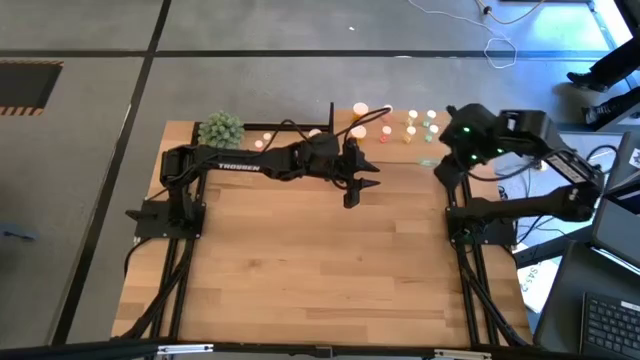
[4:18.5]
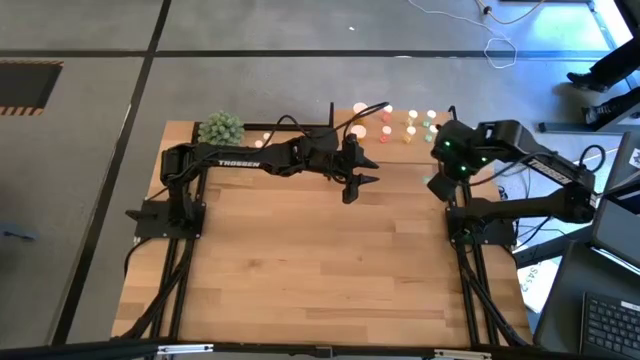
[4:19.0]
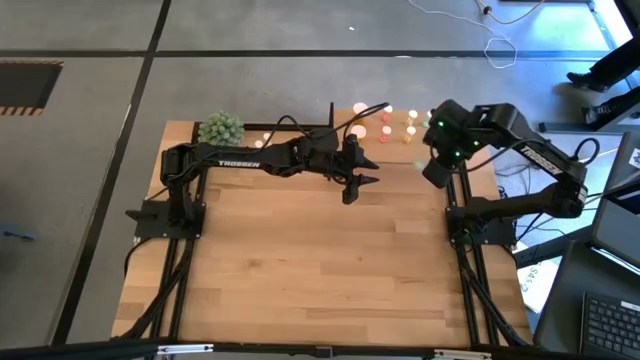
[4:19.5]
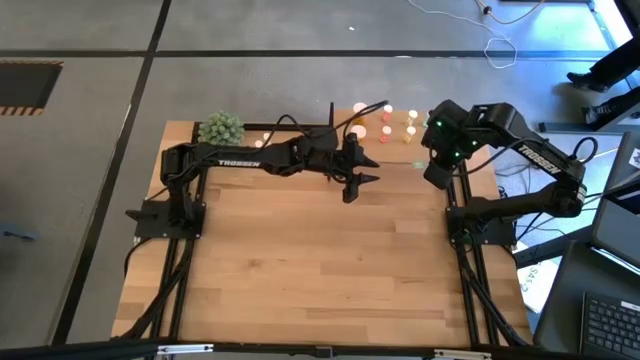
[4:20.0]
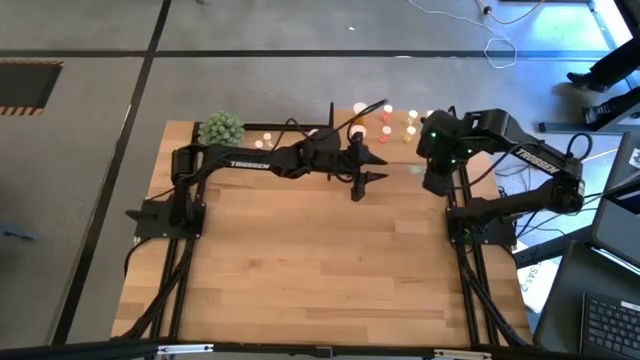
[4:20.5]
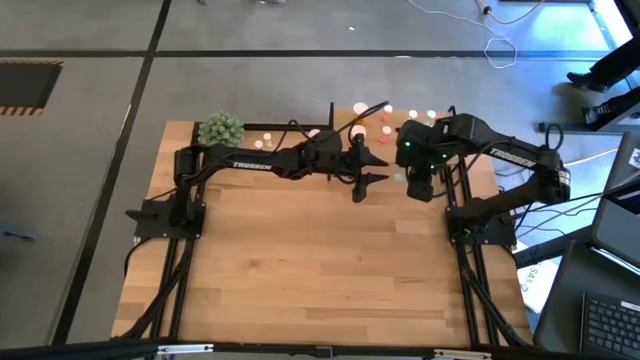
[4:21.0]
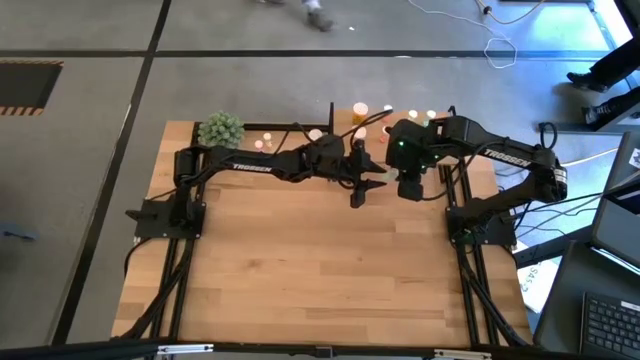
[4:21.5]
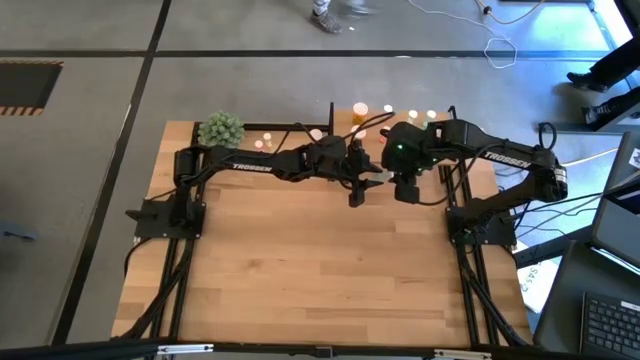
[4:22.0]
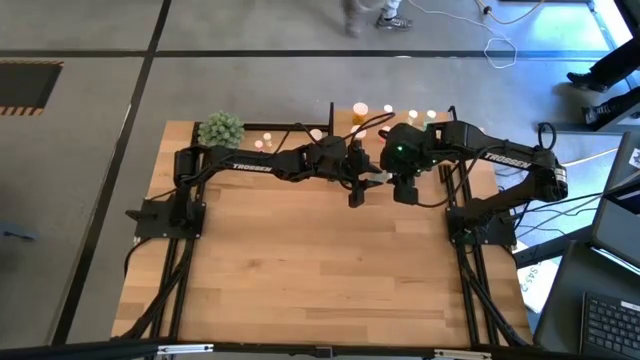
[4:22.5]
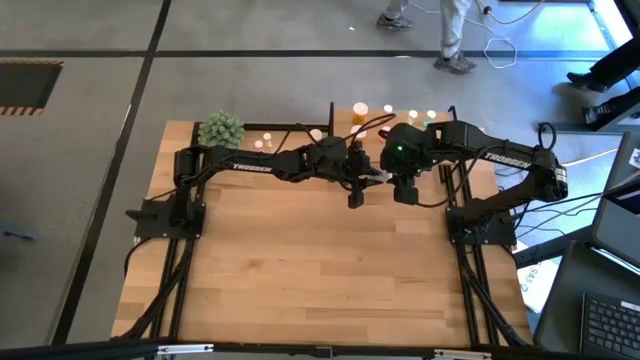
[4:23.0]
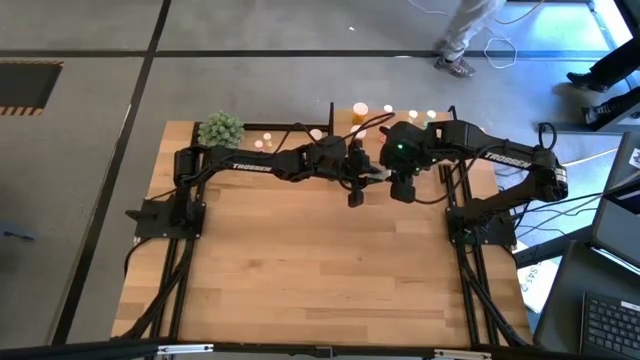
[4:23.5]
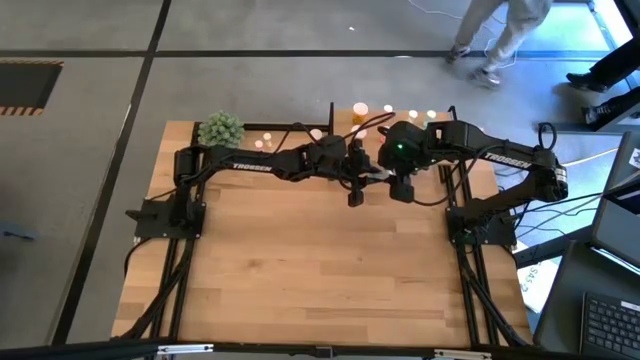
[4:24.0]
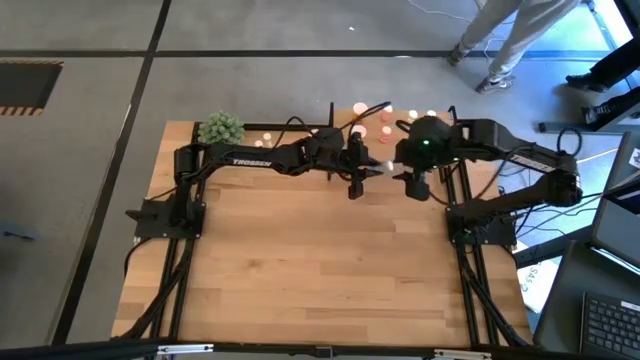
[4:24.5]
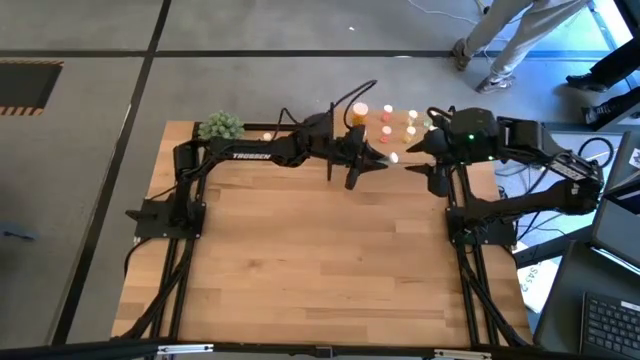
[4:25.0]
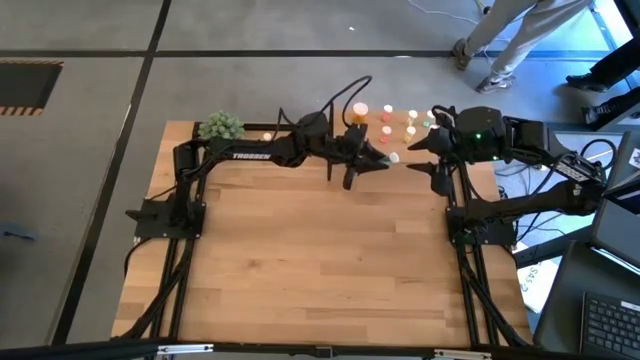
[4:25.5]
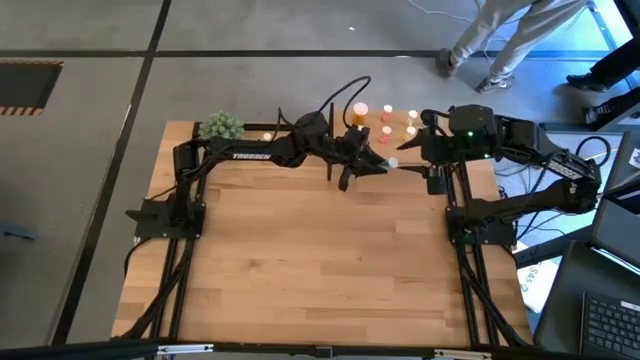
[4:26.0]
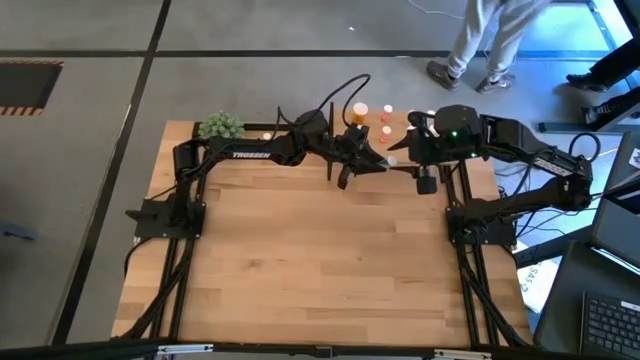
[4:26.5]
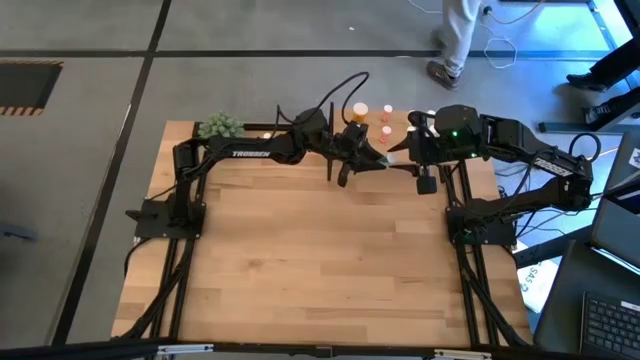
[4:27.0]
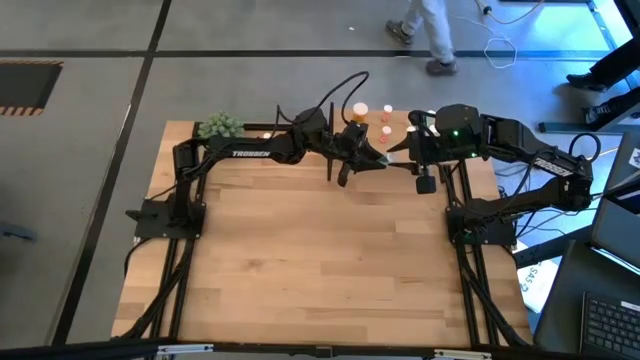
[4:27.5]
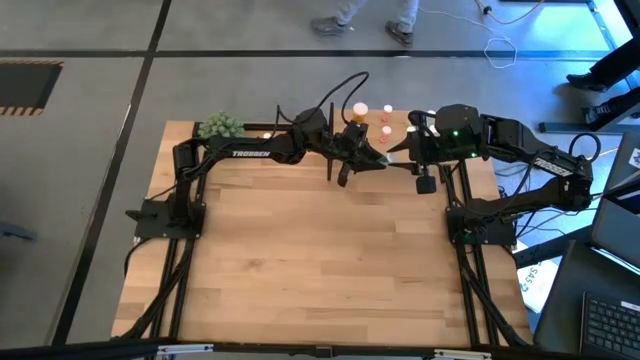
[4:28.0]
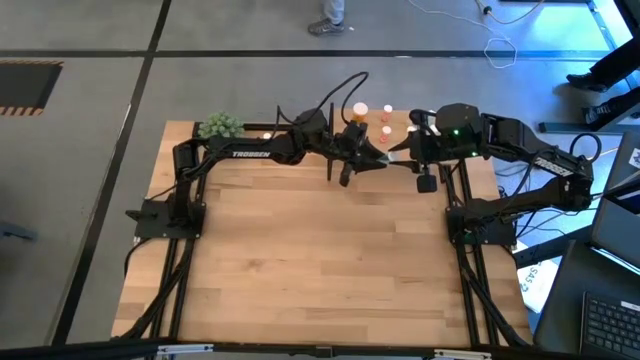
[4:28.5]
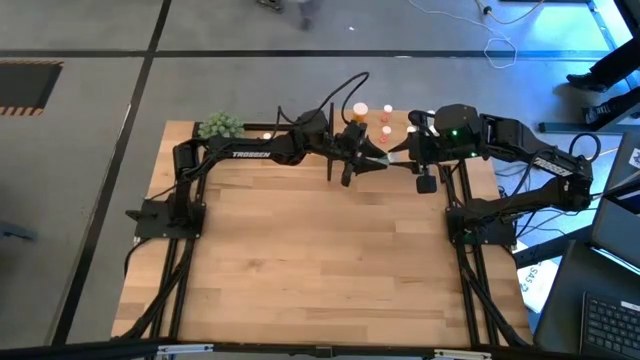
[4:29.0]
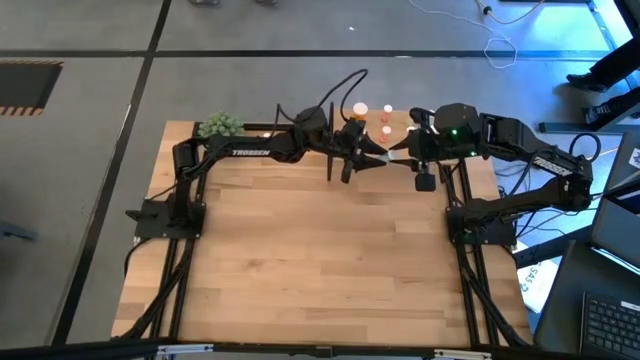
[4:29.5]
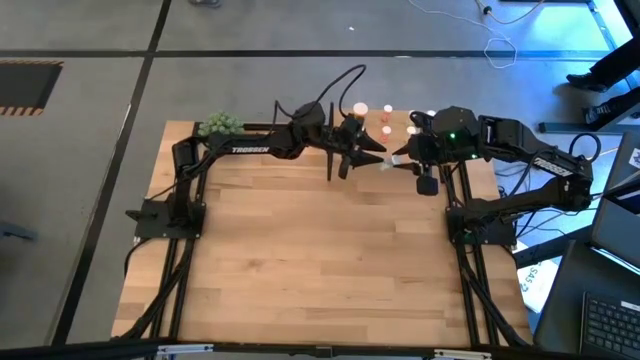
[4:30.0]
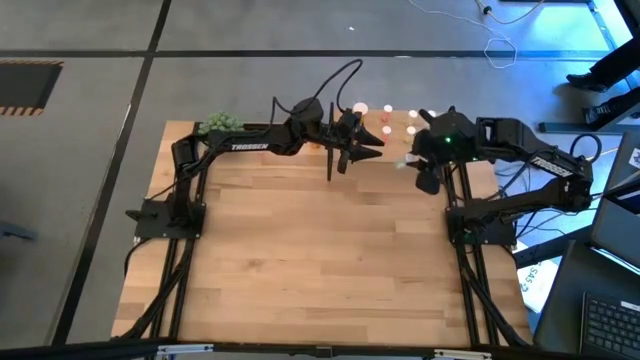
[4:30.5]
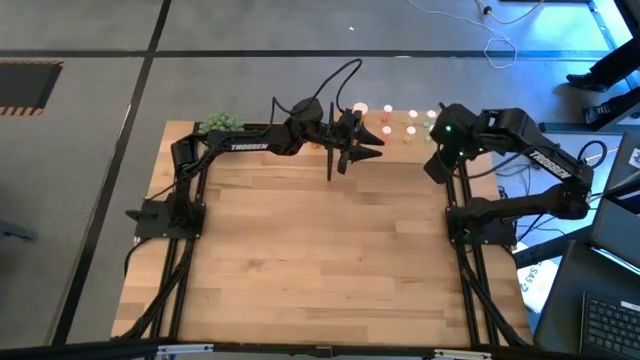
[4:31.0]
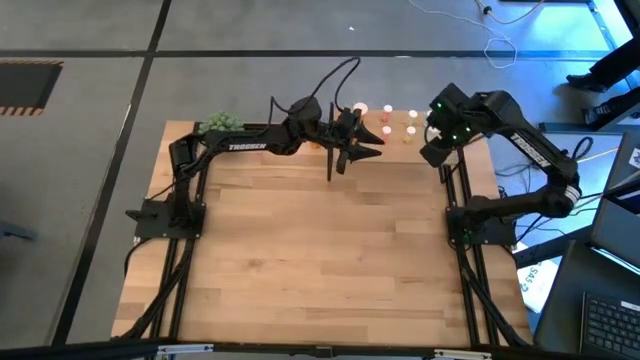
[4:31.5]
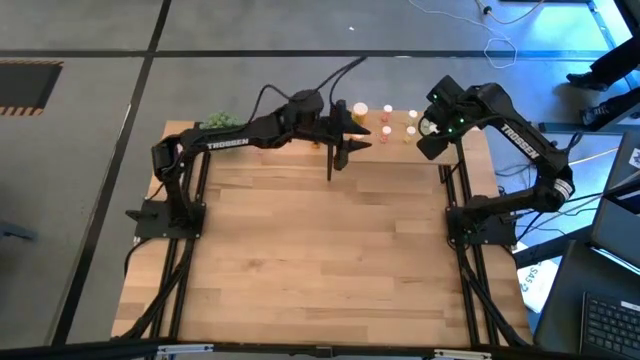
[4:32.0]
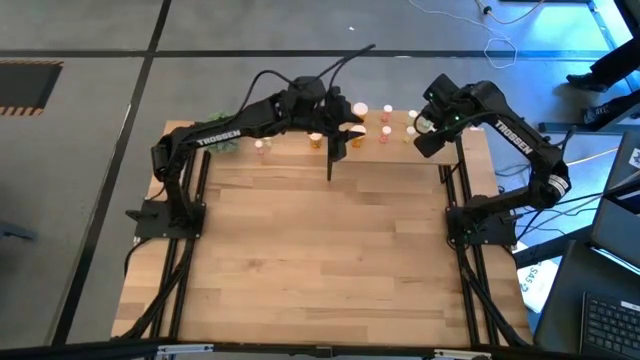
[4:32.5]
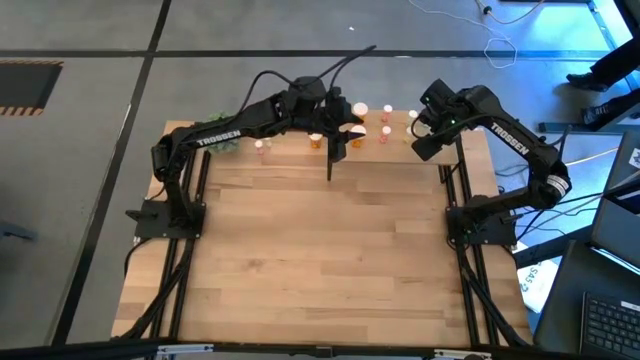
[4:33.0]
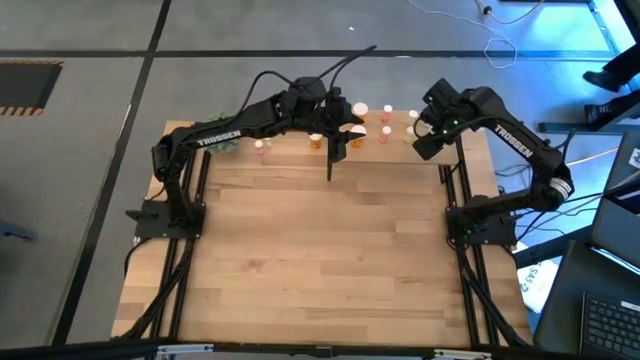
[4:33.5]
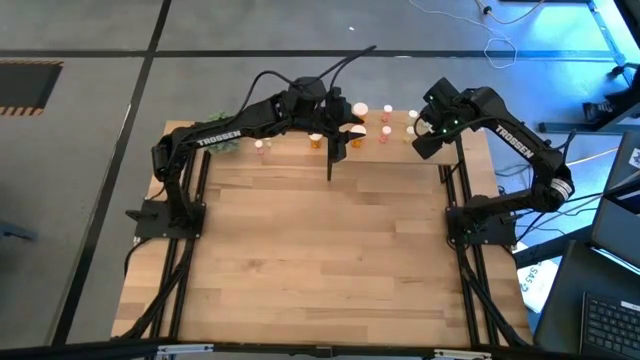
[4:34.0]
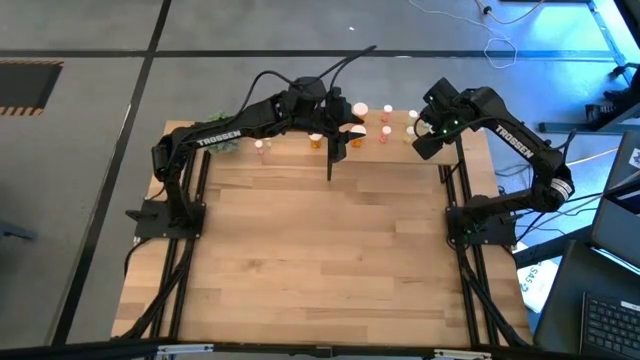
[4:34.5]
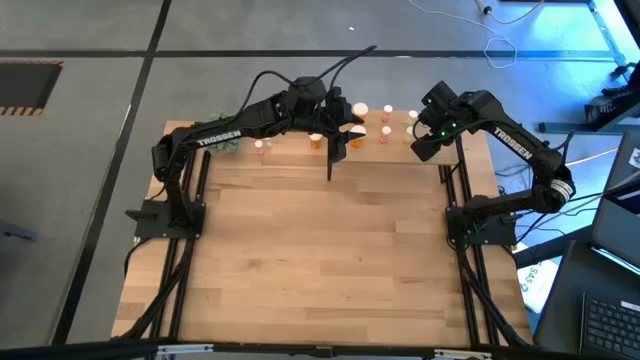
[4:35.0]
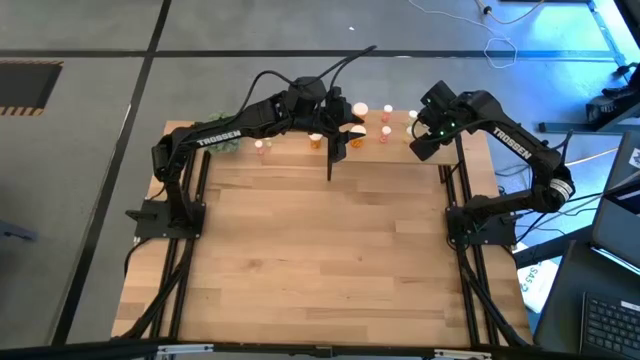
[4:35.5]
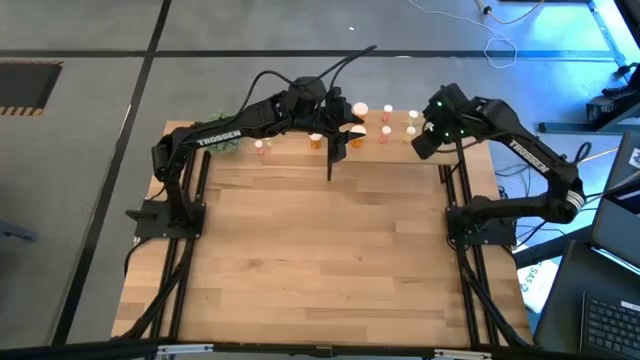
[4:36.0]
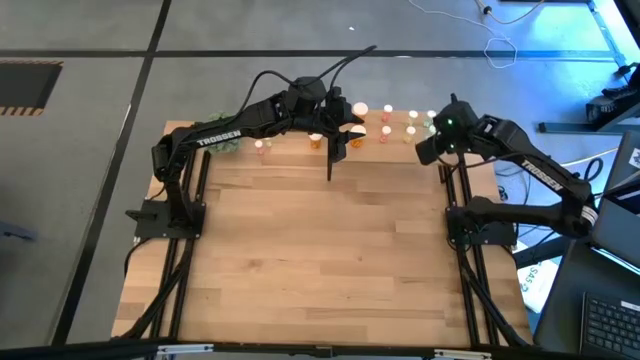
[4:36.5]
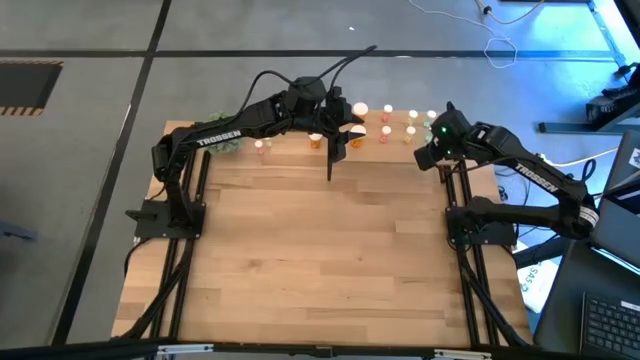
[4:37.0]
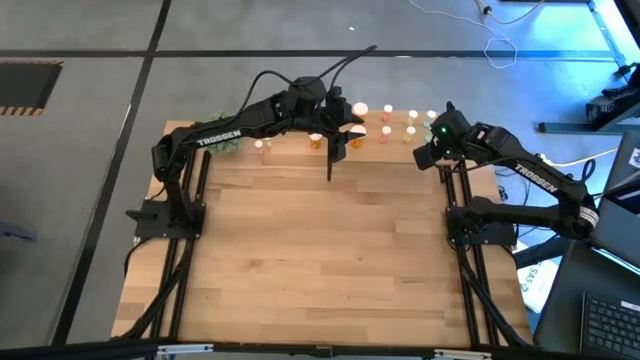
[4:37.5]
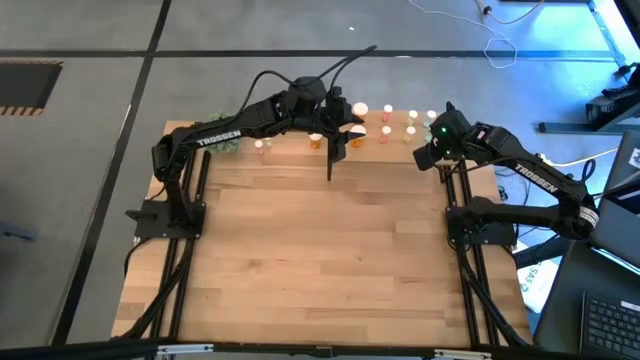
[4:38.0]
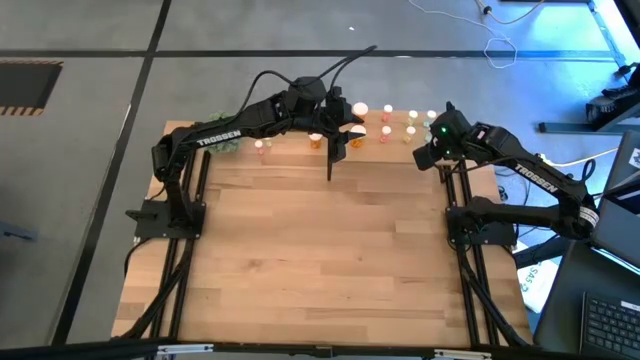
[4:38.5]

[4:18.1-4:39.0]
Task: Pick and place medicine bottles onto shelf by color
Put the blue pill bottle on the shelf aligned with the other blue pill bottles
